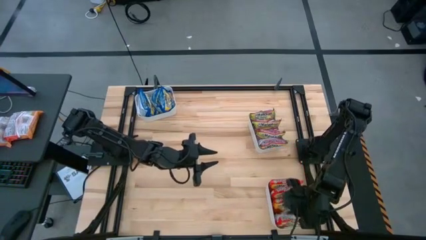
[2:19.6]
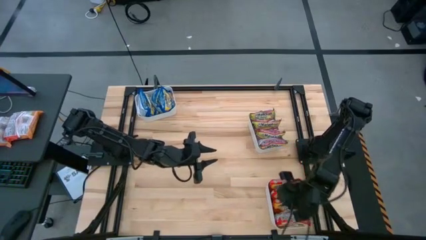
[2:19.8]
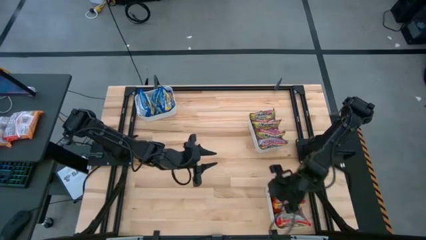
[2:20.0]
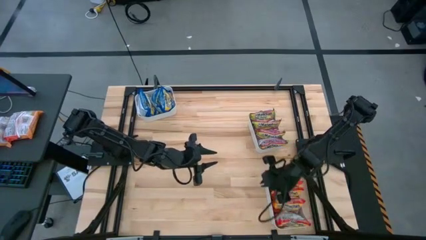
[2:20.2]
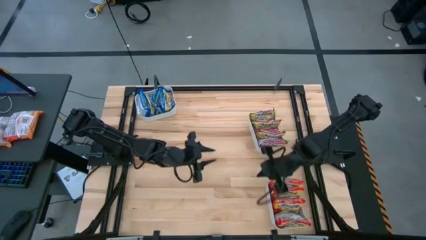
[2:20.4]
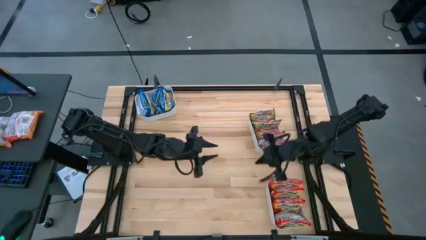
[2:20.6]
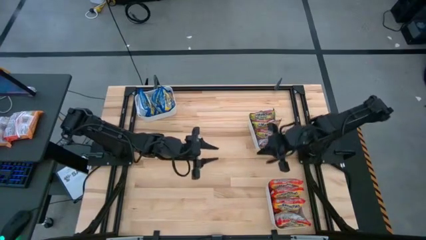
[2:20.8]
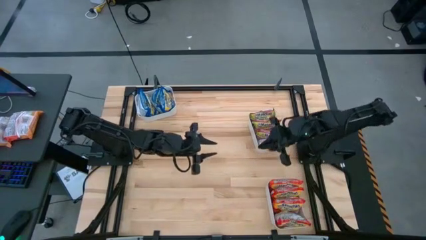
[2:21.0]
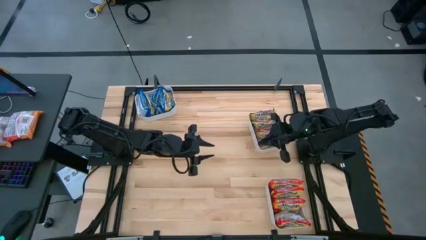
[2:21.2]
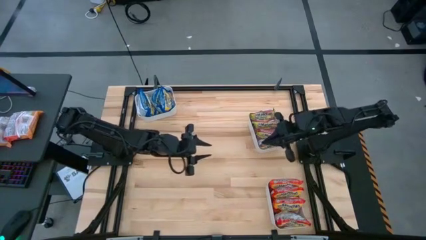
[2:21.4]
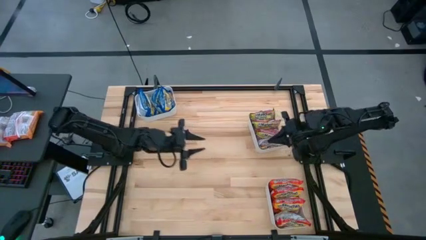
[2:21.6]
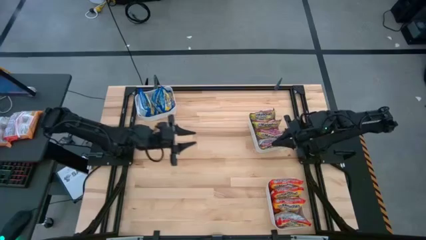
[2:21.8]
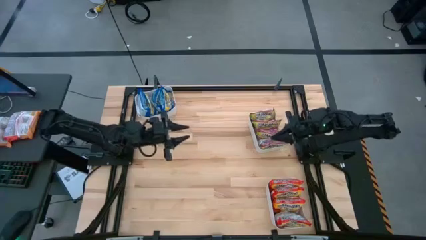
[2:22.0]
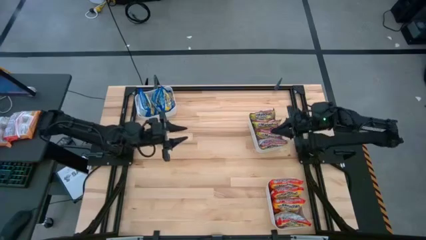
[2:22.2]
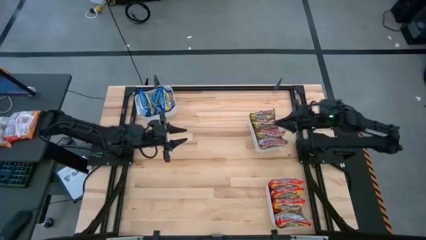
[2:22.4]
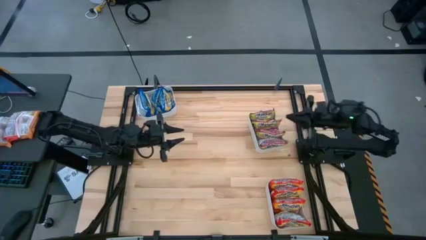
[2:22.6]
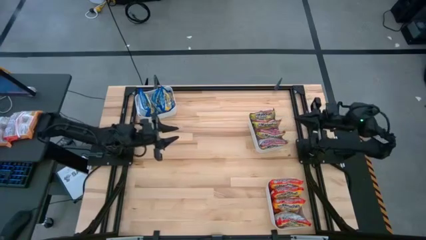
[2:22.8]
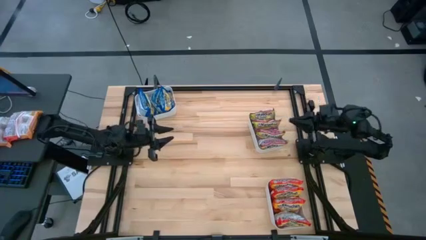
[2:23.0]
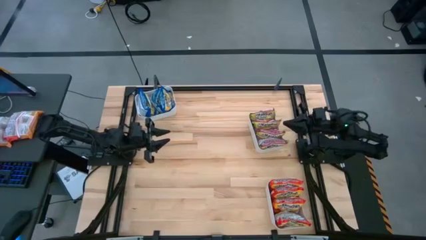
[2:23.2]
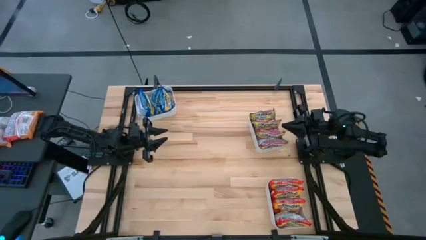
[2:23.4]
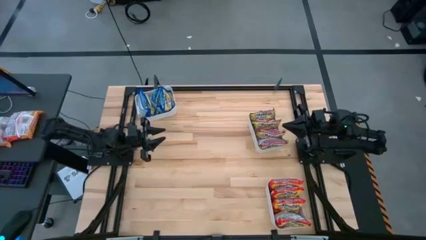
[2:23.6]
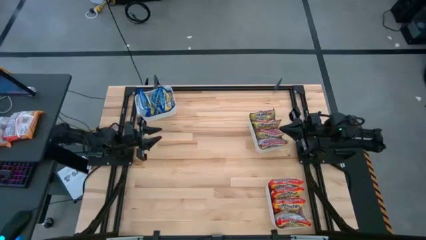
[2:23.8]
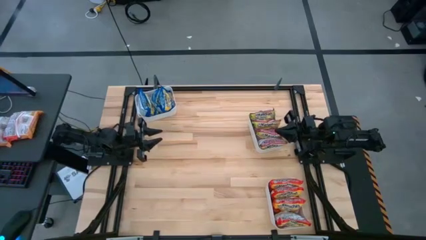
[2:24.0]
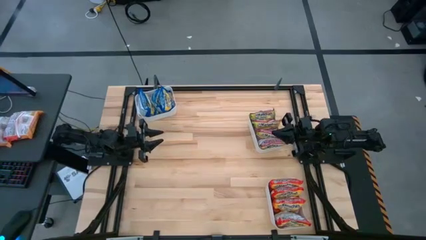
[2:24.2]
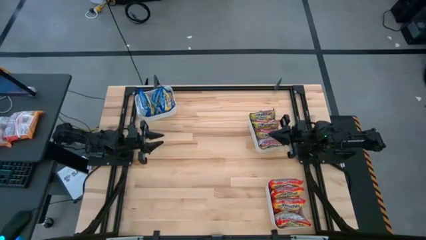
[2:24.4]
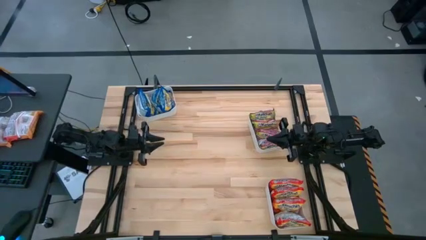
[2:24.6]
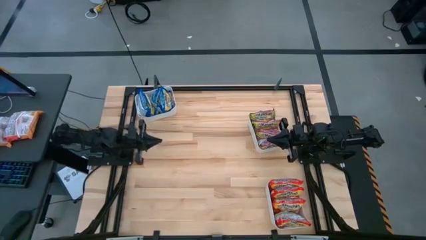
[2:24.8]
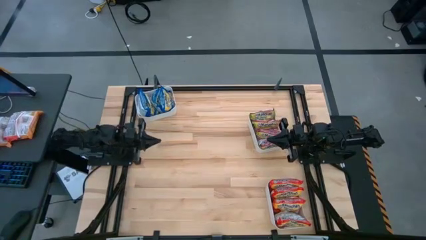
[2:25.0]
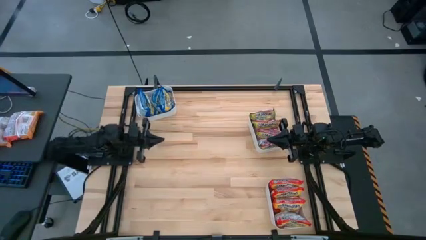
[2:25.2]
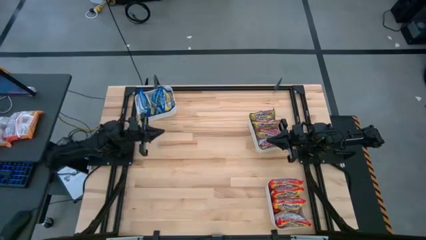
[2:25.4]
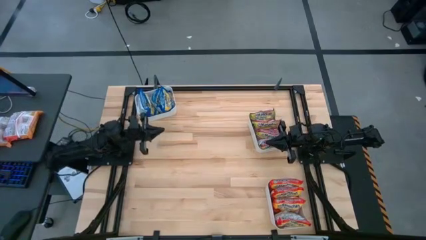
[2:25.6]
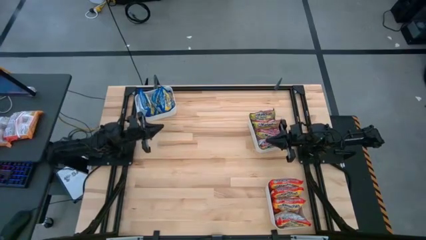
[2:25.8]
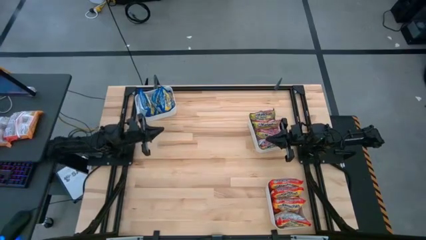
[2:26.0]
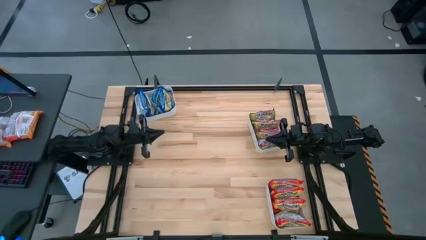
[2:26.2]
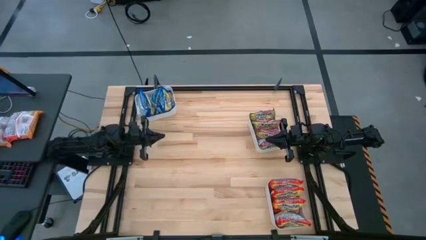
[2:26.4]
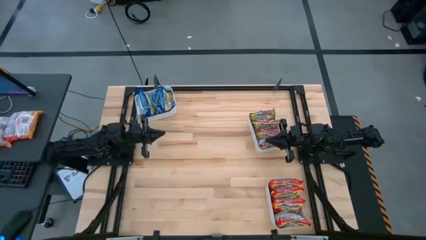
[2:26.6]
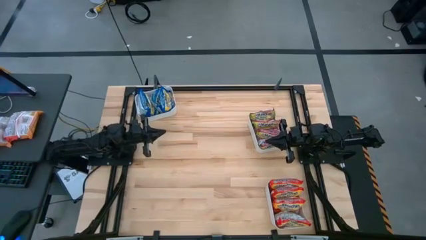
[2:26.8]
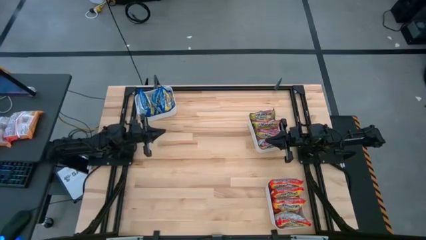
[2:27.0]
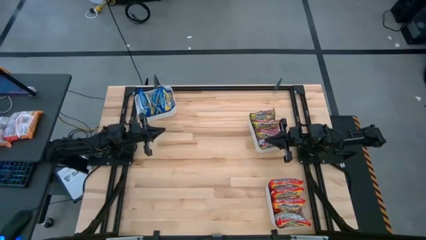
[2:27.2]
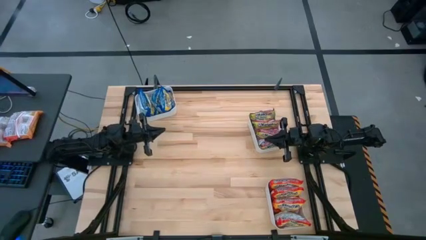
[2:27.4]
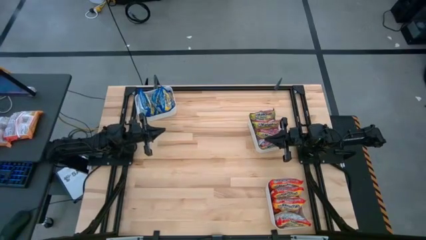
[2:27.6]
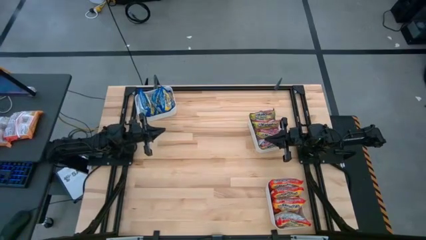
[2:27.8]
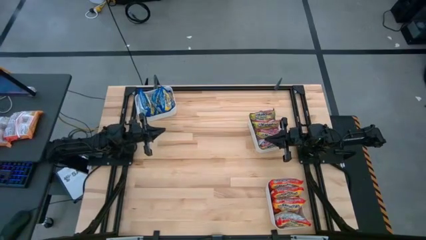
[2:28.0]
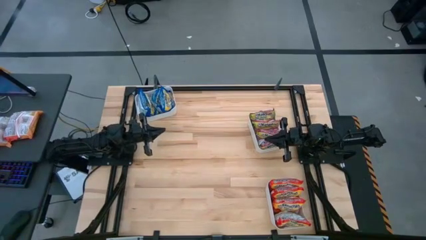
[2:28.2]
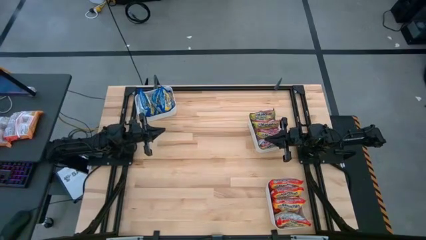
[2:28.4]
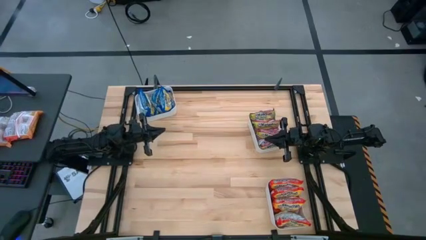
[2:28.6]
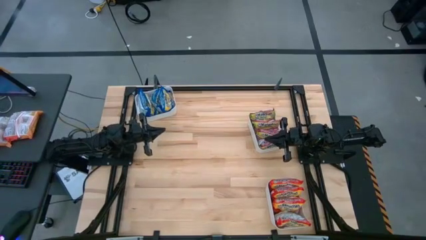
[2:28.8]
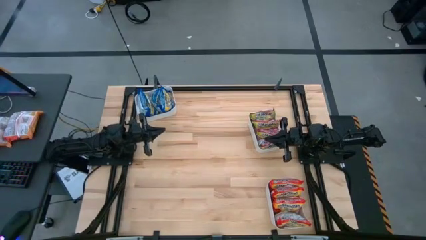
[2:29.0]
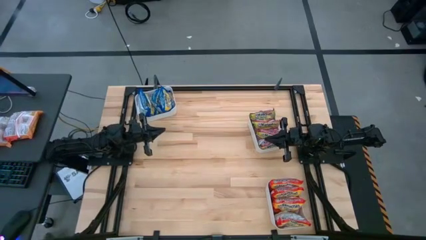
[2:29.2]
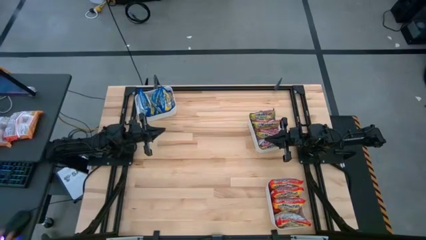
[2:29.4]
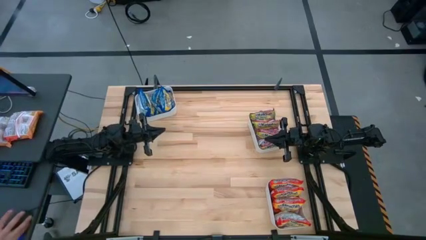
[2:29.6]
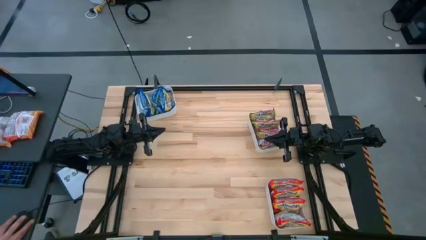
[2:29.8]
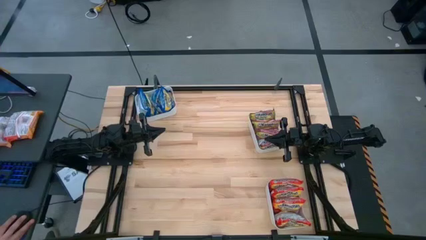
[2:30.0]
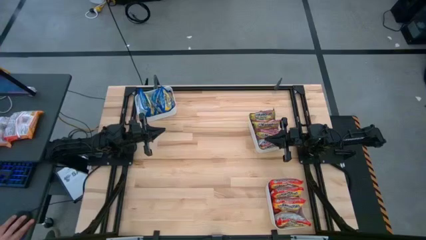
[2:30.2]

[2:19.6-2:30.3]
Task: Sort Maruchan noodles
Return to Home Position

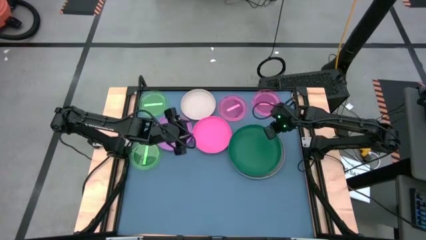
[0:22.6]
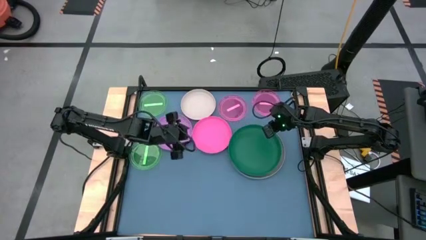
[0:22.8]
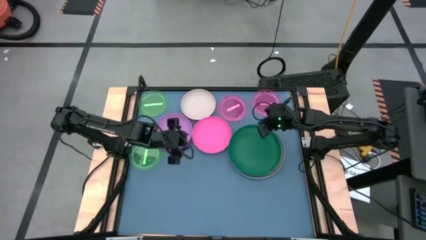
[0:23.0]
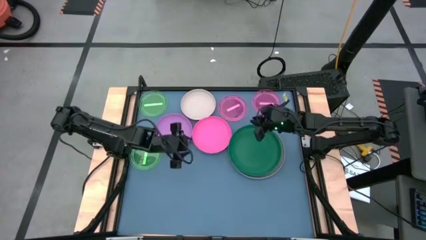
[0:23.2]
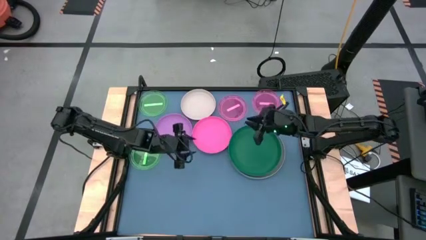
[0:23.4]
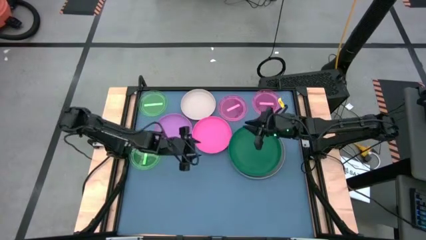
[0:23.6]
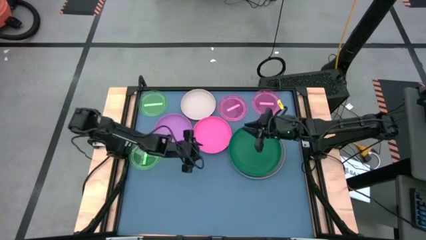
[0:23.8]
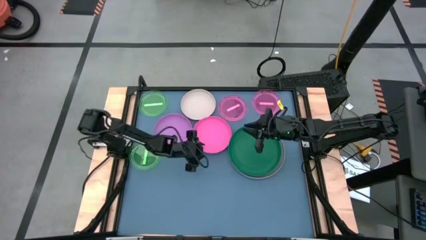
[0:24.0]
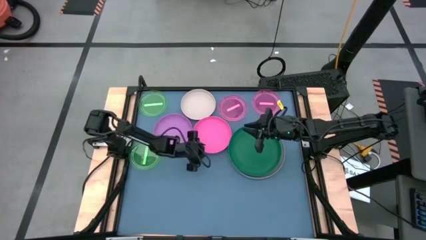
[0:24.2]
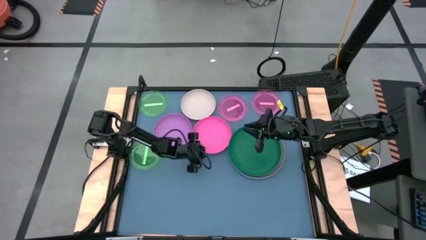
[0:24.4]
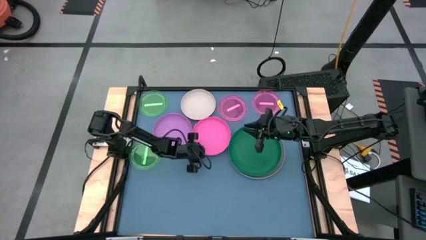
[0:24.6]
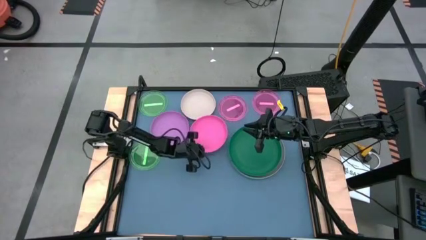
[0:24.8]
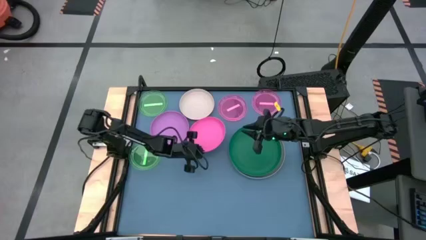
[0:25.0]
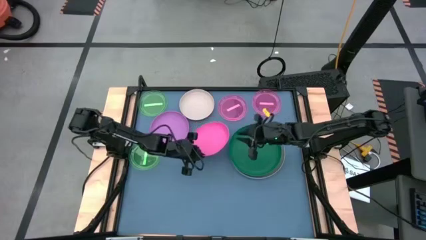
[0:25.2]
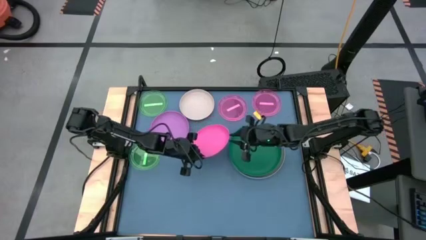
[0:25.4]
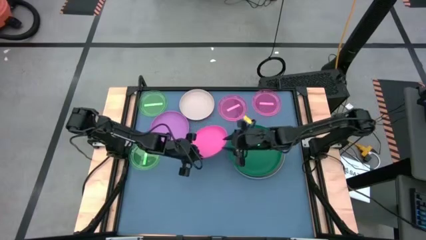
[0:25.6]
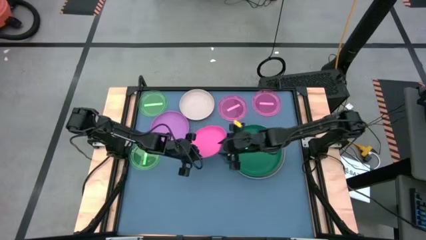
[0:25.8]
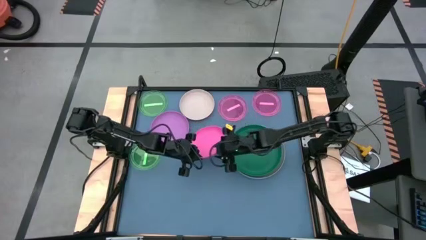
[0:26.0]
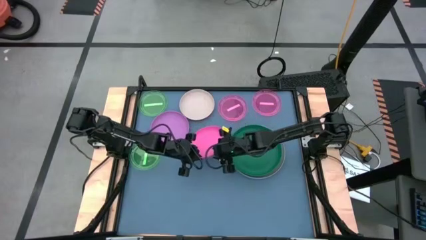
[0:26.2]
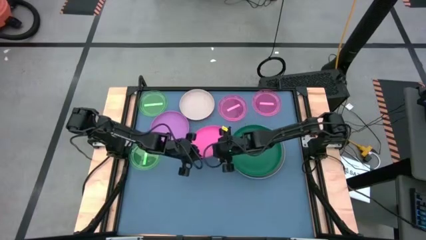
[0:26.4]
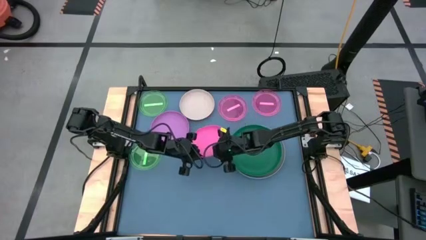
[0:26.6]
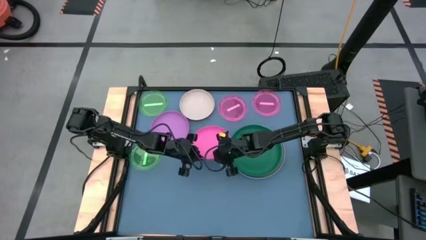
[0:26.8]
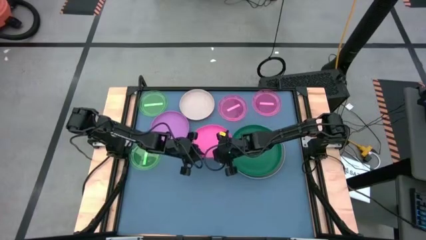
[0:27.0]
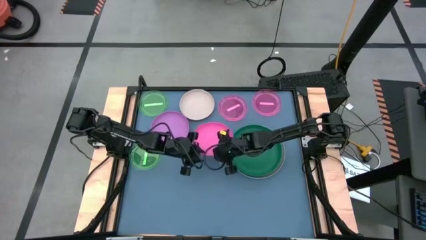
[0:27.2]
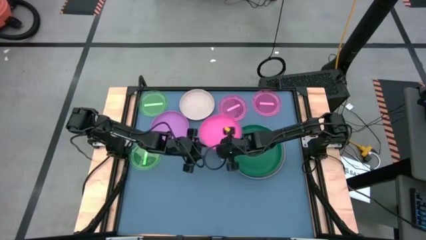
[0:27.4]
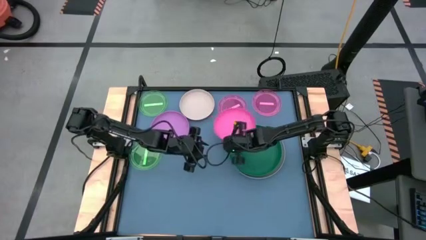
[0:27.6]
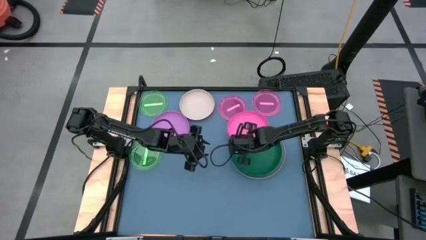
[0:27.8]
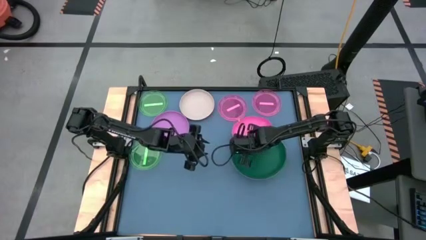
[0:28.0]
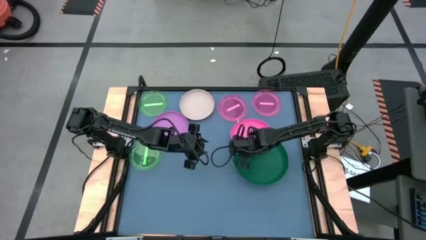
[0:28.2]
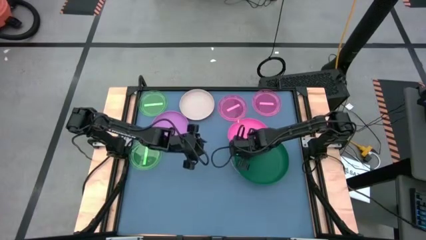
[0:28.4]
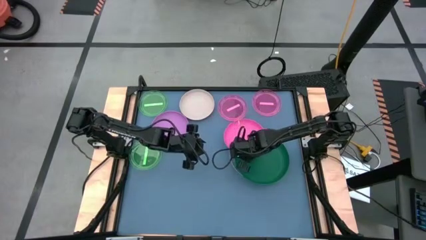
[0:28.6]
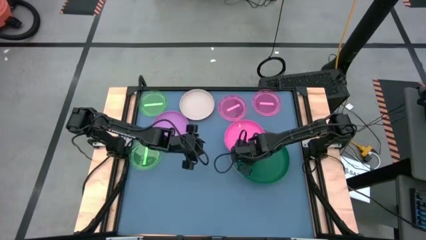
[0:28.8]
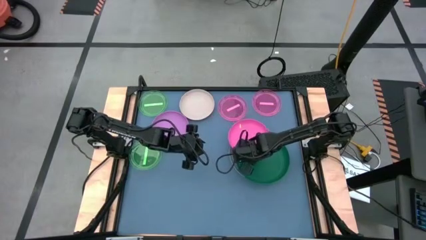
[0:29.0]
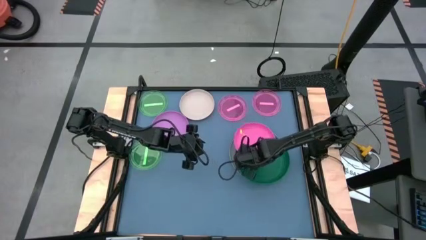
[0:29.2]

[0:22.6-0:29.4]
Task: Stack plastic plates
Stack the pink plate on top of the green plate
